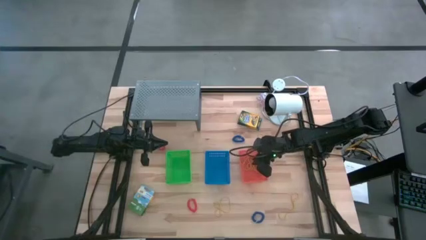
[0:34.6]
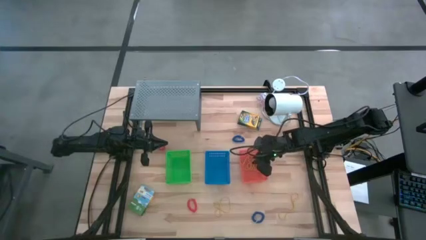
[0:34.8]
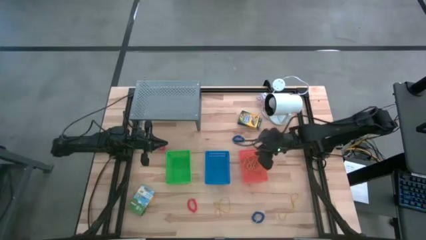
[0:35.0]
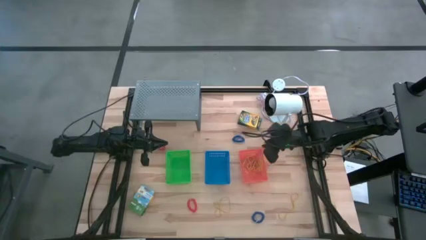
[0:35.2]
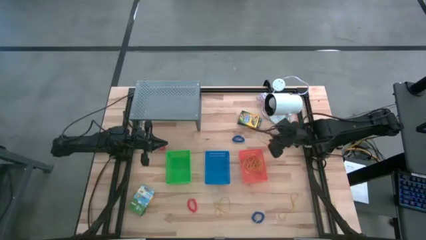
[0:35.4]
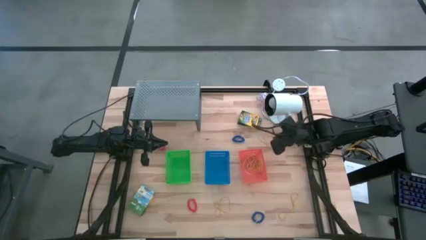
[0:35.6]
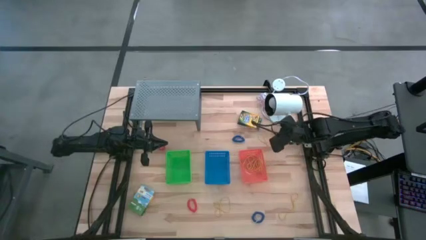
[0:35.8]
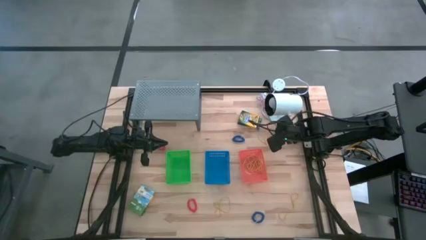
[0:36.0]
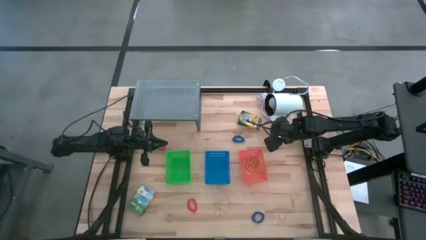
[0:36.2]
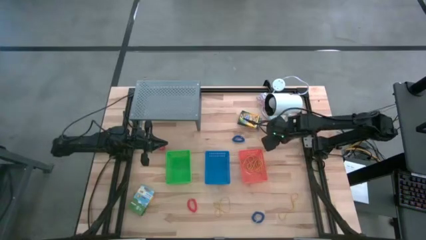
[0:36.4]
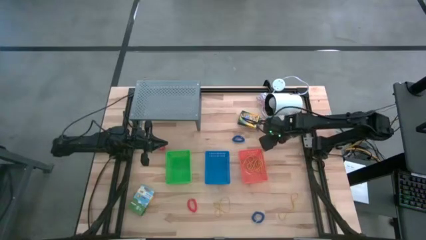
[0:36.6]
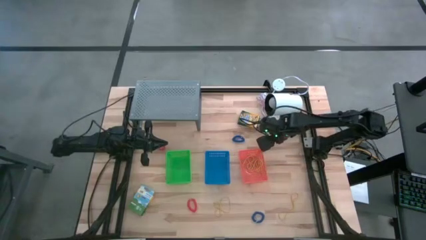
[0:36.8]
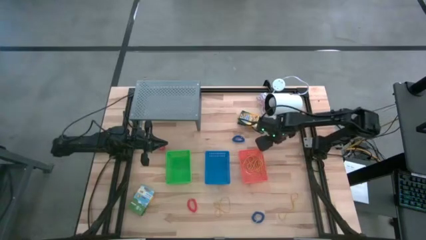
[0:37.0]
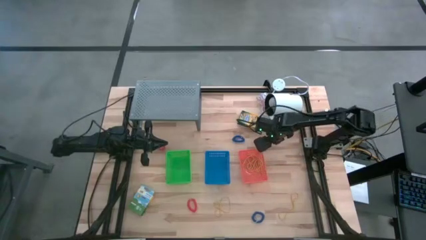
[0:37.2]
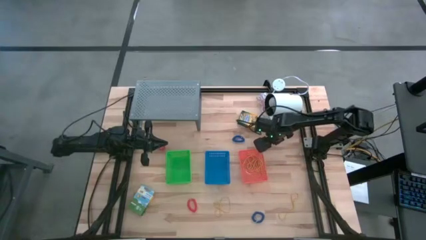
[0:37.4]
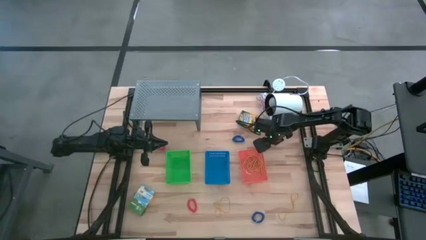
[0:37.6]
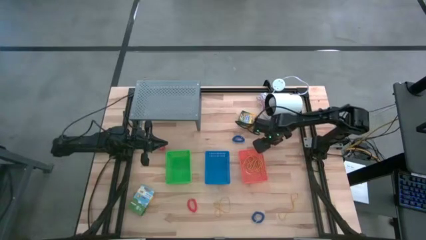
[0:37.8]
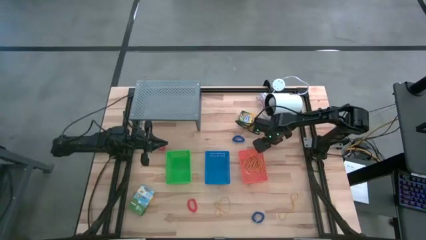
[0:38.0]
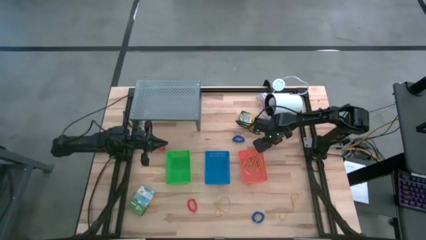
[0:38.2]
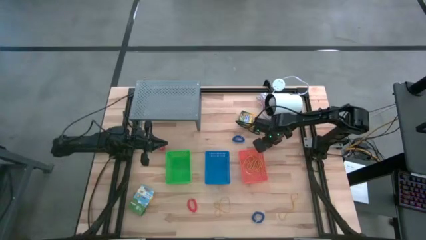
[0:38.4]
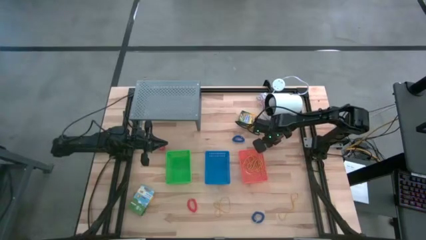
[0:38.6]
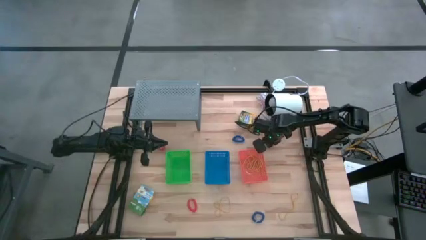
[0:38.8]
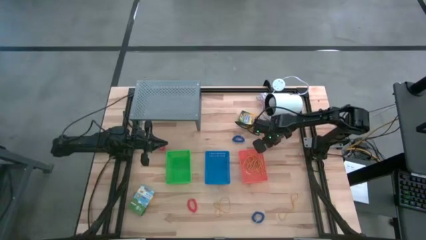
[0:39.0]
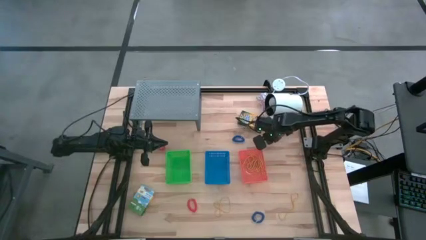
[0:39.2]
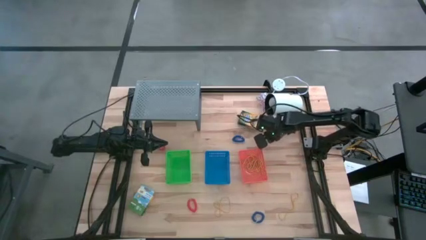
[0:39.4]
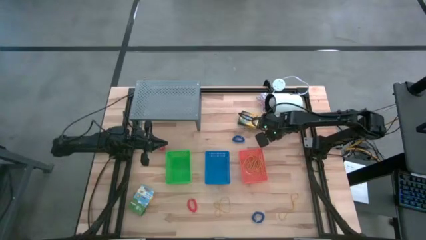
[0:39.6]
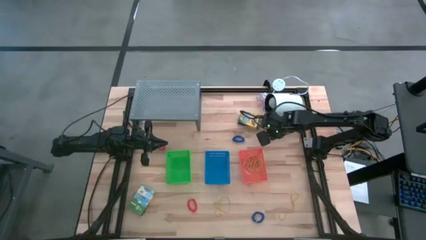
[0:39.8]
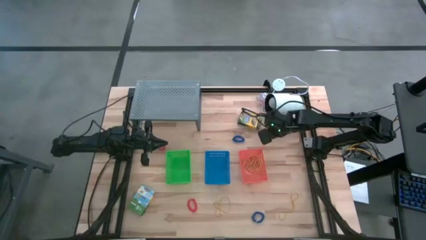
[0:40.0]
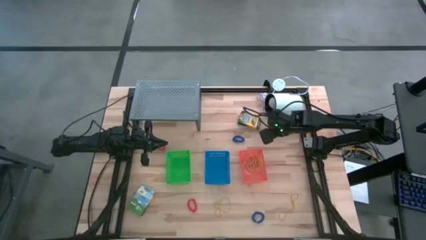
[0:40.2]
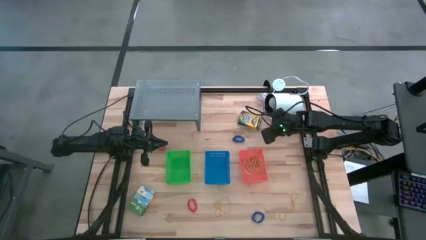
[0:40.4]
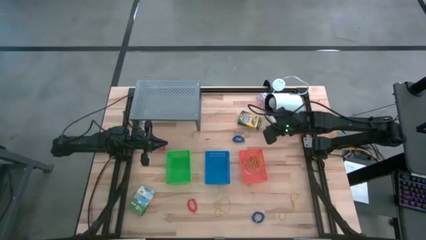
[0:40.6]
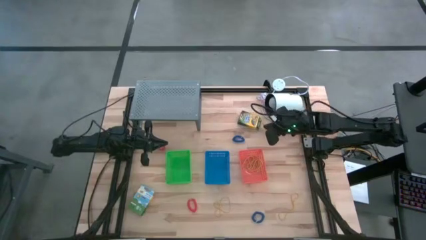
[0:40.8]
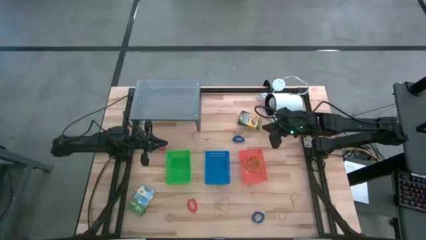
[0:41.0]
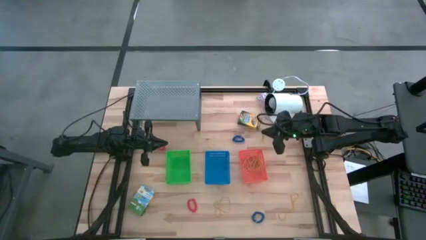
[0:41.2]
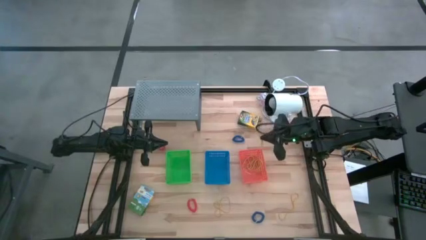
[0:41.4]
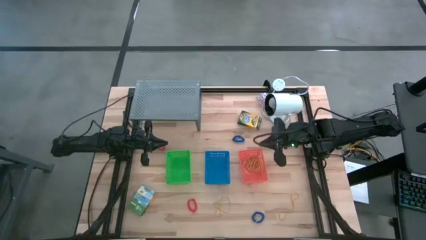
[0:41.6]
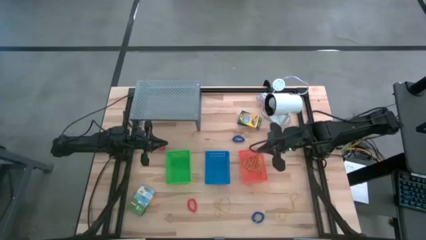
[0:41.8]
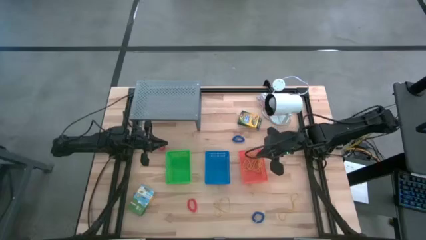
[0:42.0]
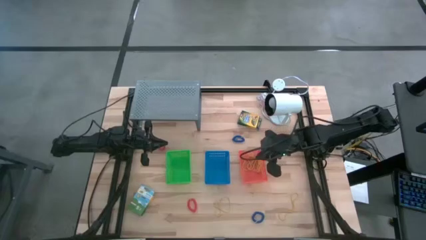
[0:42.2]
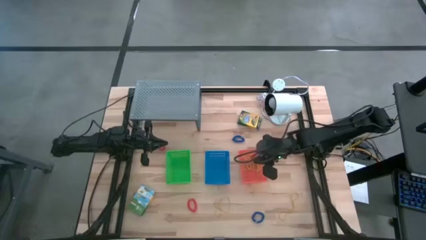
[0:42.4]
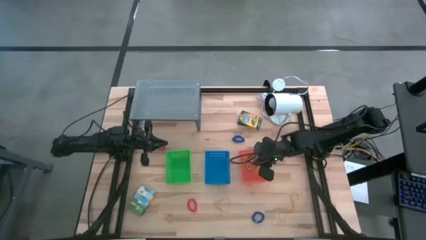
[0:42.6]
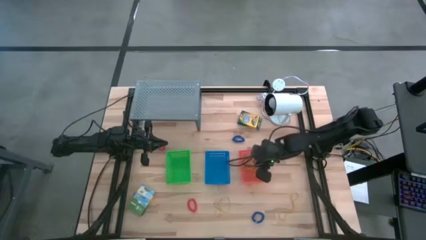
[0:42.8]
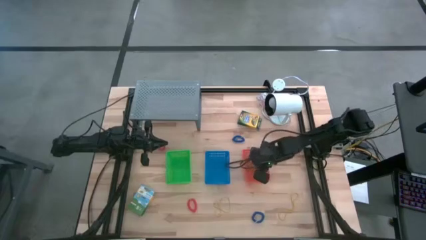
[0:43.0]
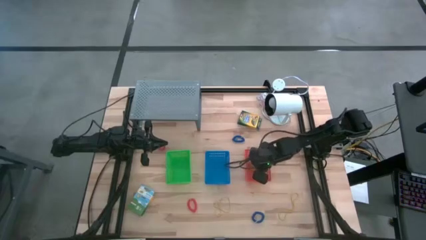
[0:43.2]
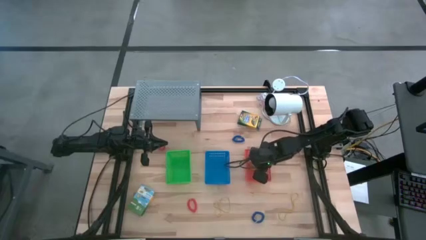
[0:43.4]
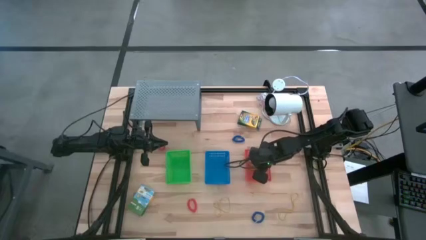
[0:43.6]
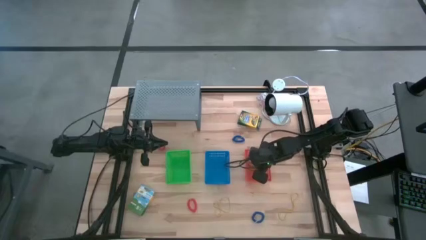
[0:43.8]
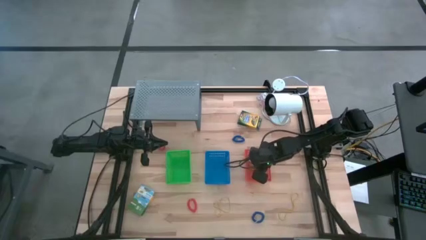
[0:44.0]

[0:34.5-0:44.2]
Task: Pick & Place Office Desk Supplies
Put the yellow rubber band into the orange bin

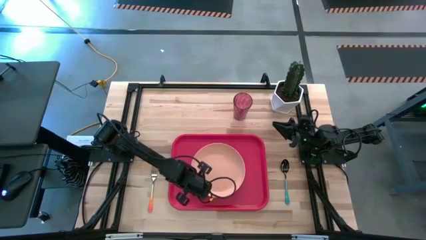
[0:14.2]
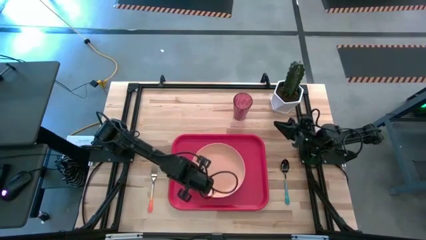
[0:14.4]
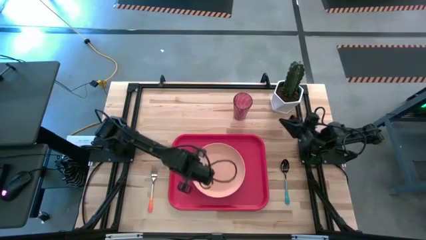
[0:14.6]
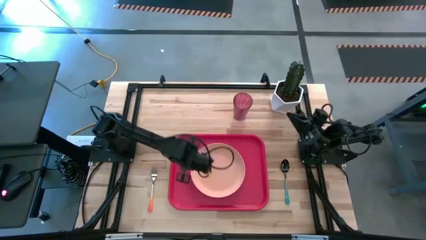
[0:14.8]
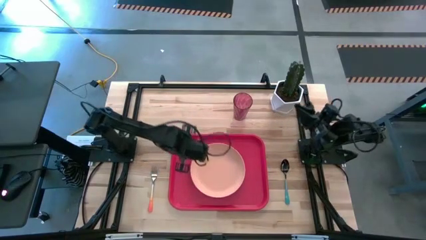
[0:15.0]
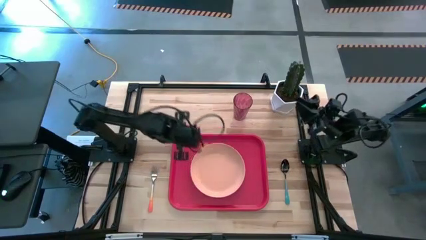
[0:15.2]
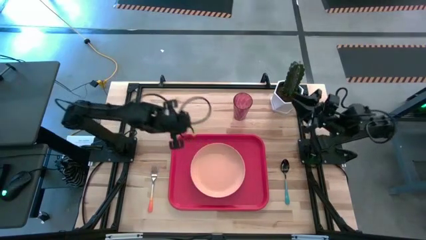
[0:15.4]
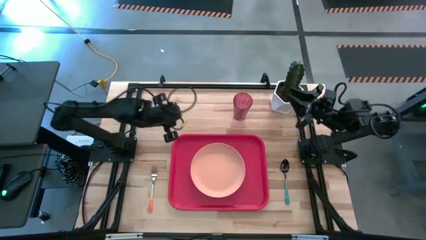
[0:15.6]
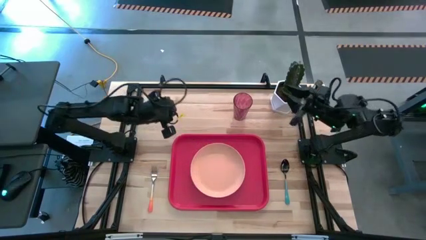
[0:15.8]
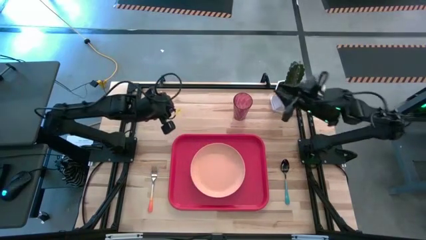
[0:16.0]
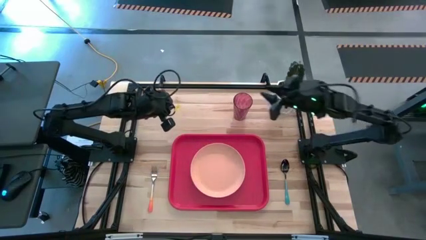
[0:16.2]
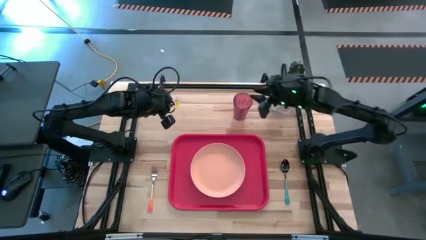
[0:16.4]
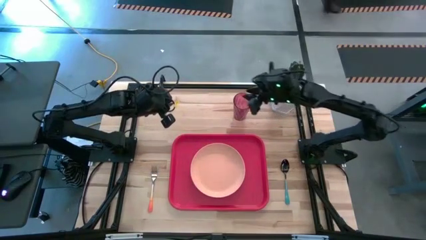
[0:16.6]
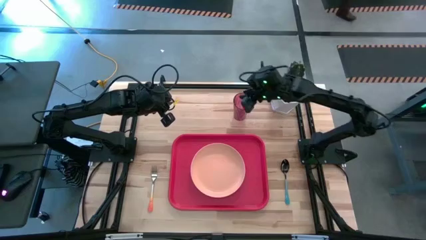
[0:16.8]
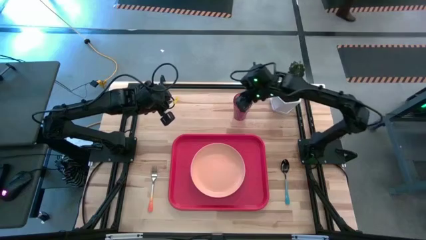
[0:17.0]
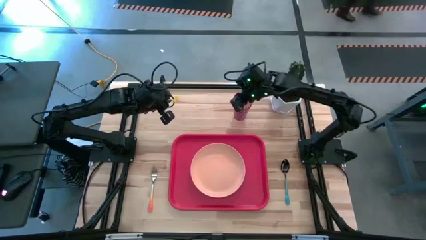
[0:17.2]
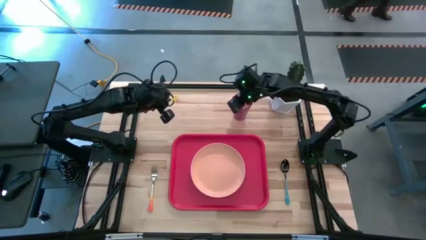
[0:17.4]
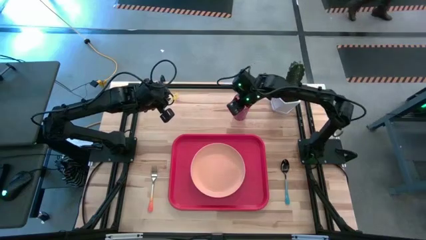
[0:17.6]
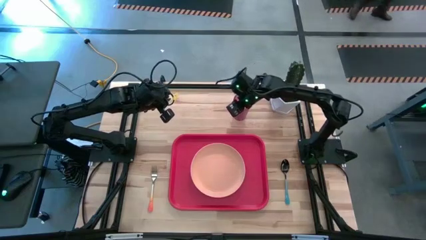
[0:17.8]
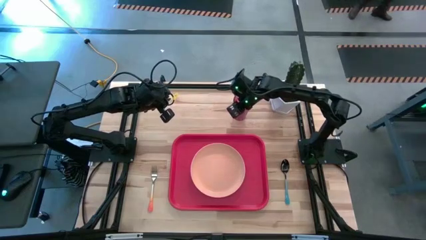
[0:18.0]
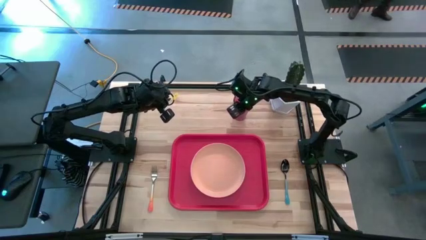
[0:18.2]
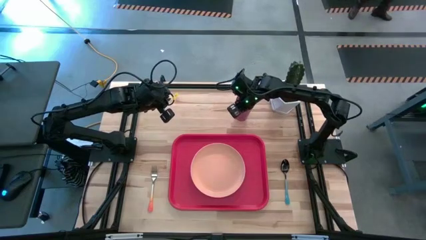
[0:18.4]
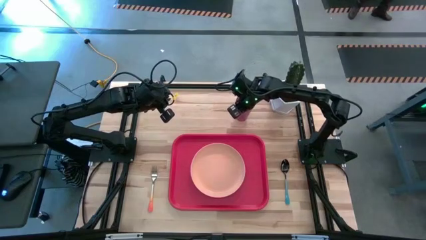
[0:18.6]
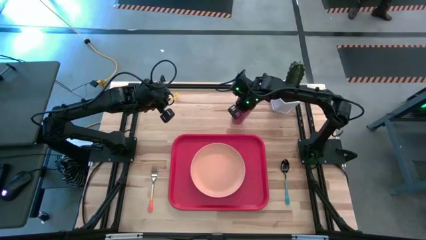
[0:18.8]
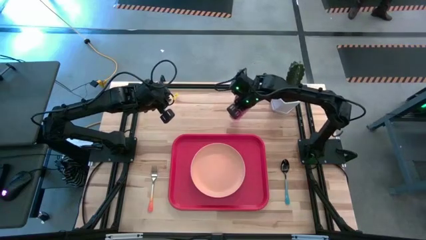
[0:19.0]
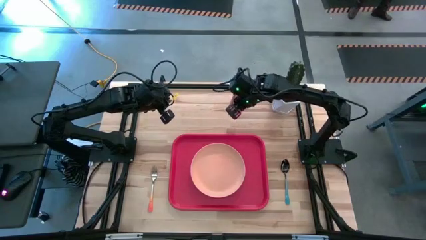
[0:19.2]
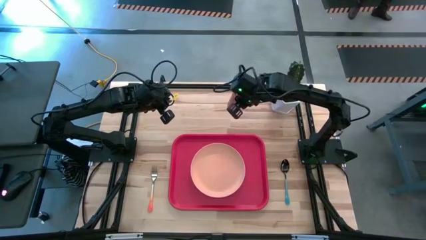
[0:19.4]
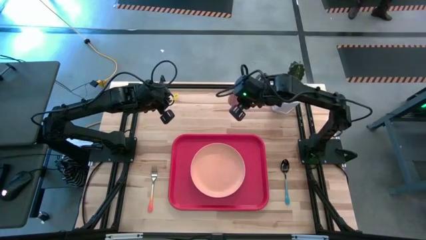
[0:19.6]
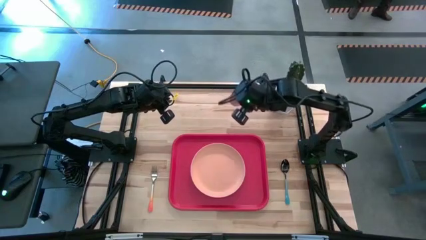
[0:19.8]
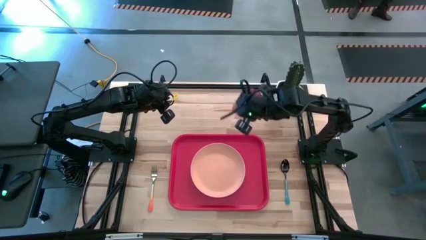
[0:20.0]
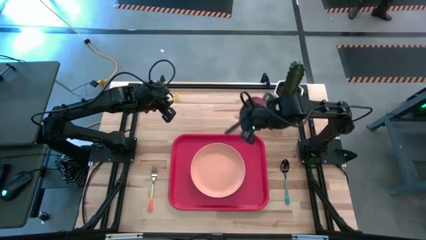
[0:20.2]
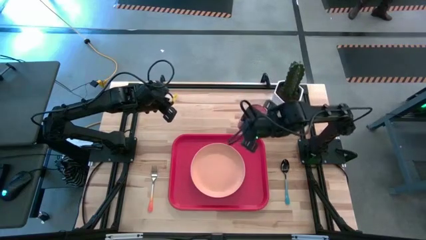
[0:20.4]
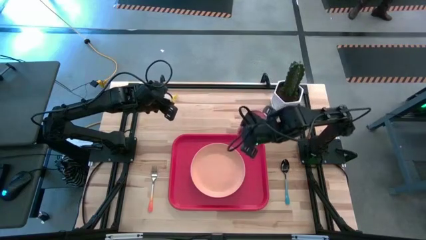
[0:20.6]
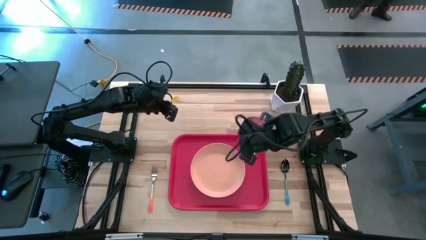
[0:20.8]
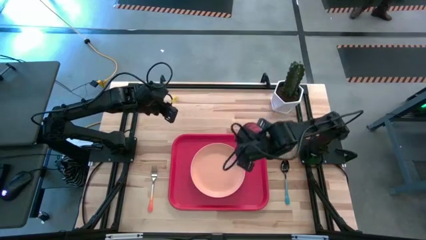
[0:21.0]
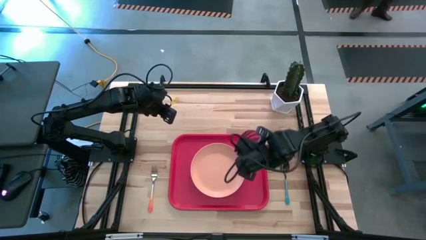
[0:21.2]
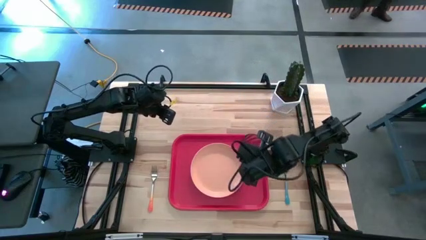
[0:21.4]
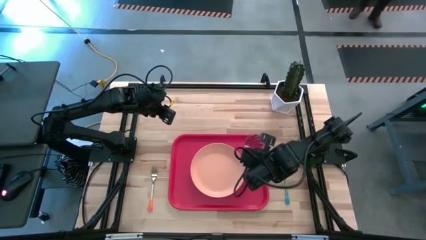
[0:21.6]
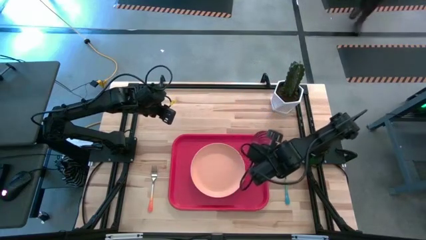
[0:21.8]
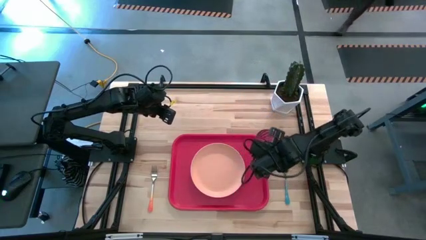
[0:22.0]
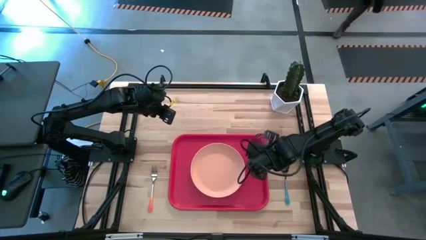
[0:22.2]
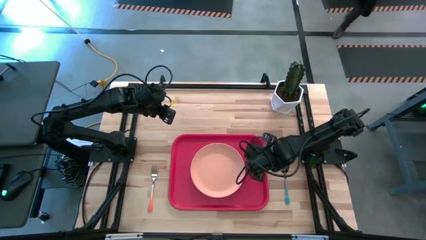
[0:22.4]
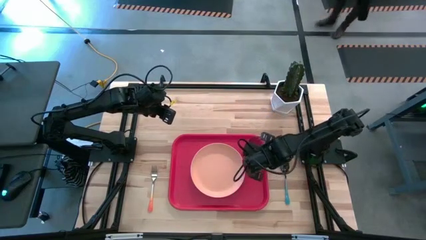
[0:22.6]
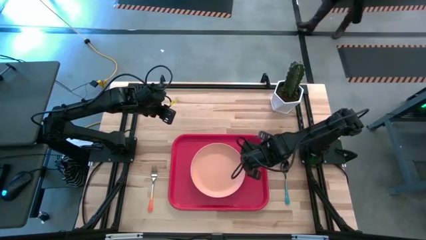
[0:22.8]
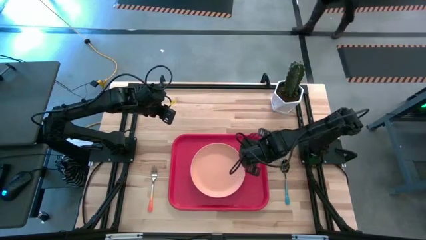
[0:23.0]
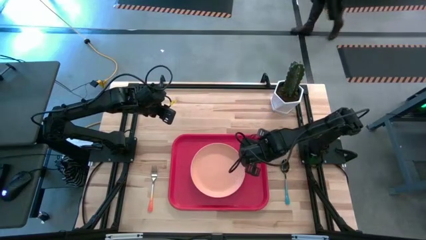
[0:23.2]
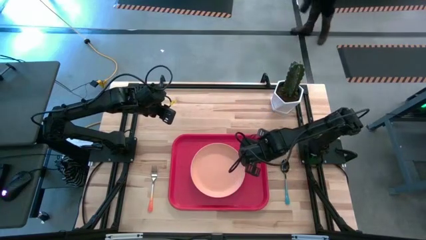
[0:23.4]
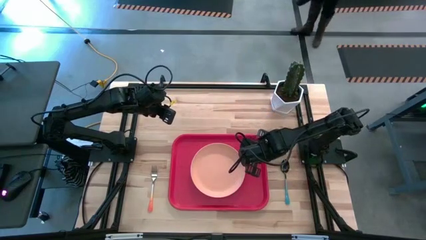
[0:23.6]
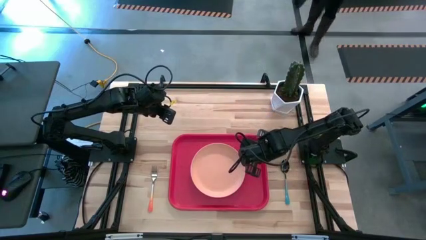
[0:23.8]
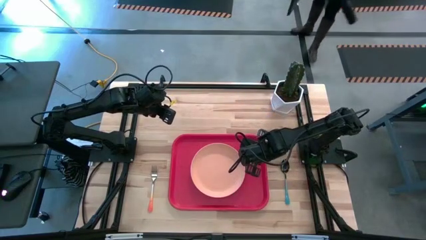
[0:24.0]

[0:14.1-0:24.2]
Task: Pick and place plate/cup/fork/spoon on tray
Put the purple cup on the top right of the red tray
